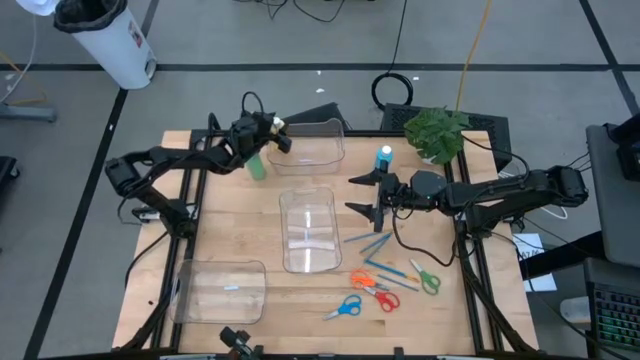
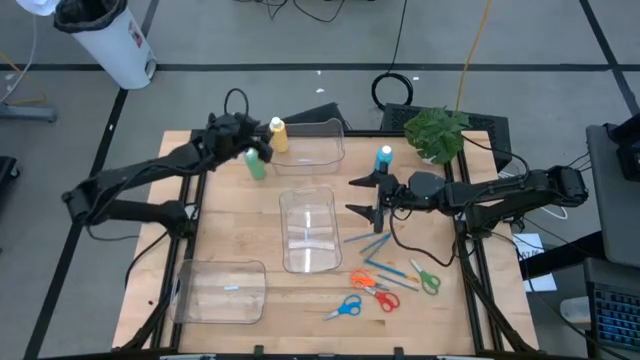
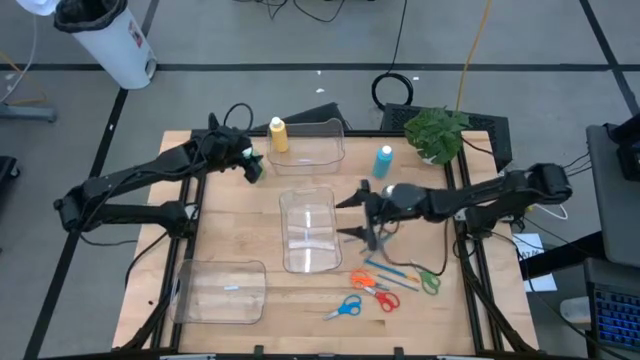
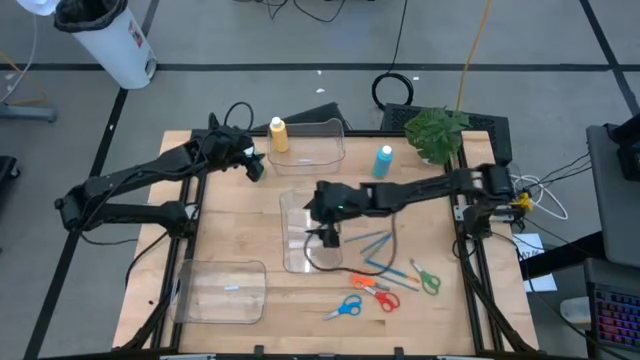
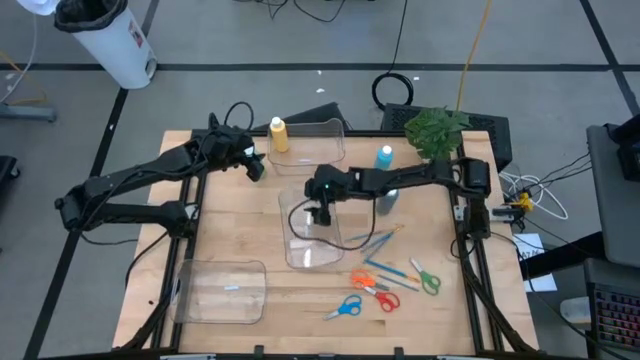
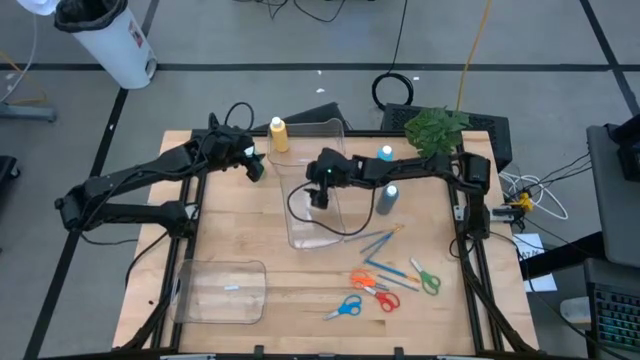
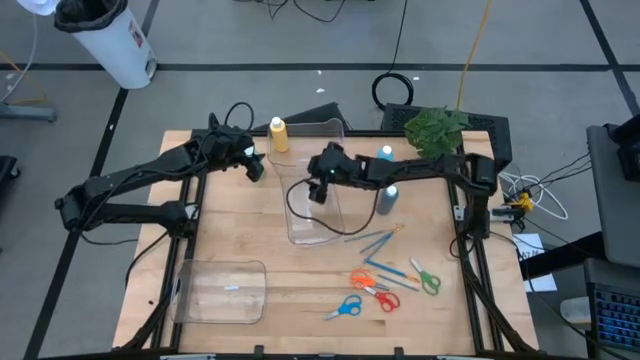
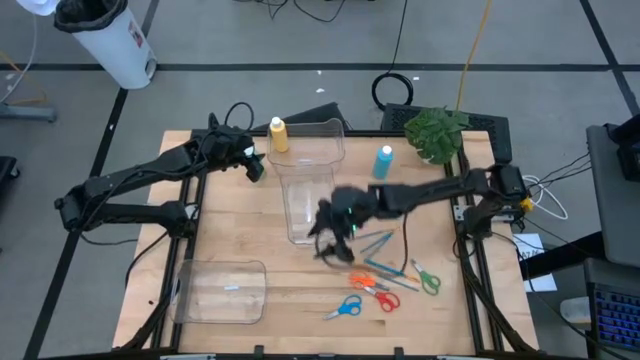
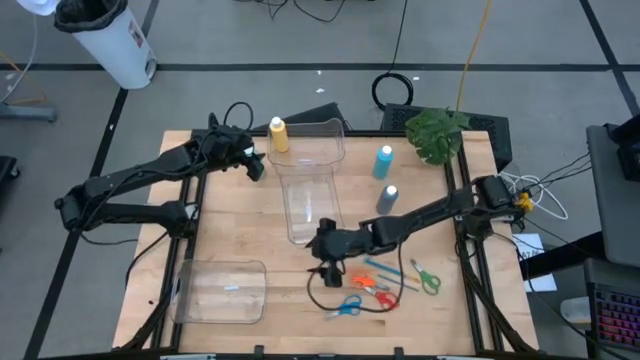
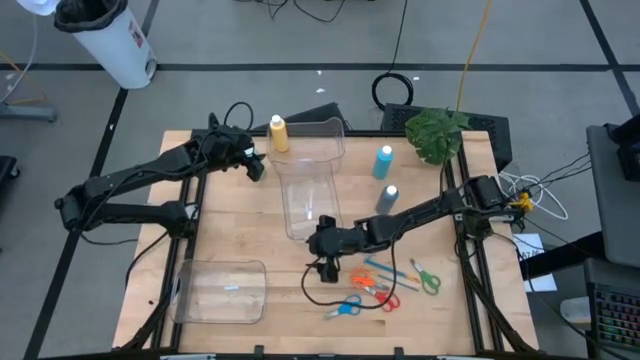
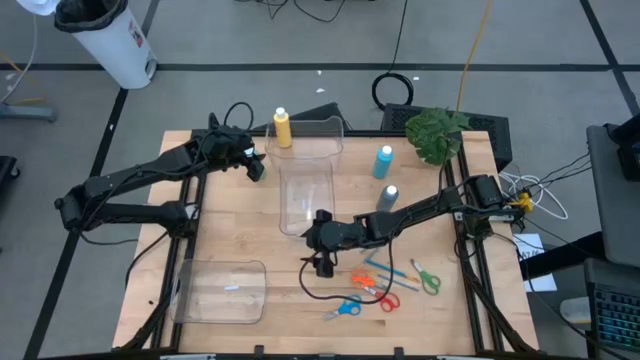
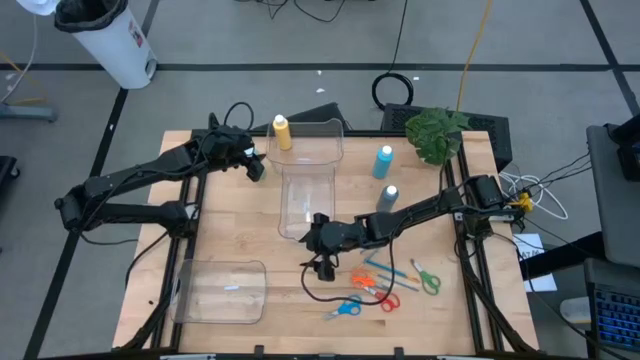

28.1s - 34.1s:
Task: Pick & Place Paint Supplies
Adjust the middle transparent bin

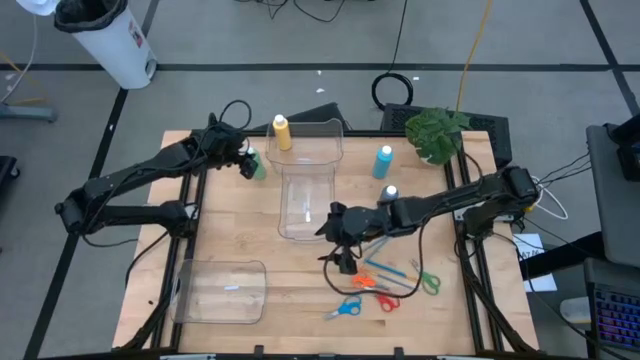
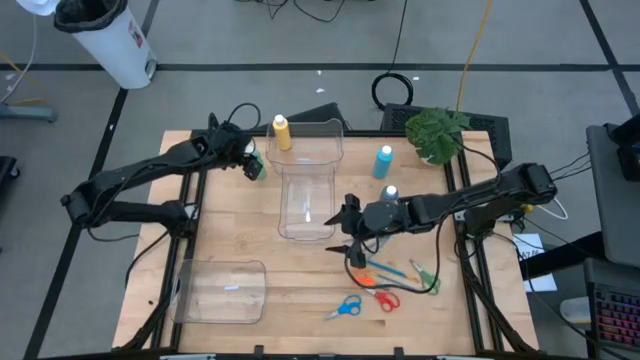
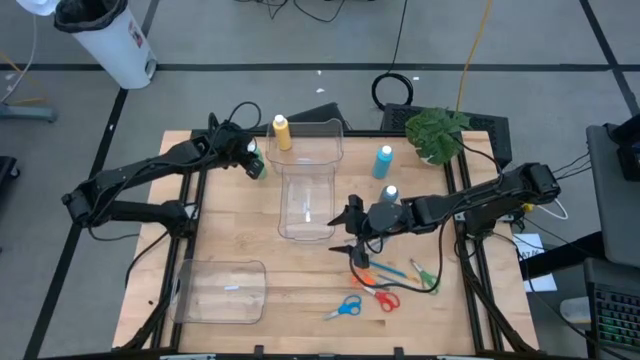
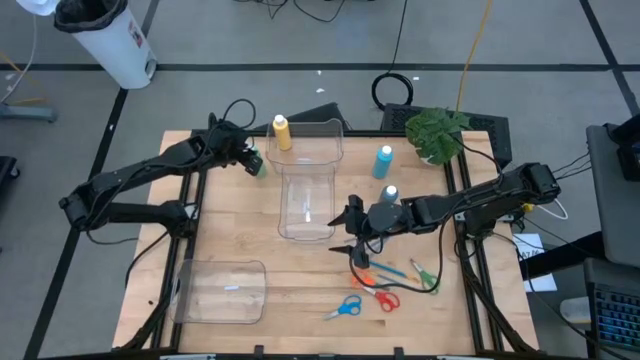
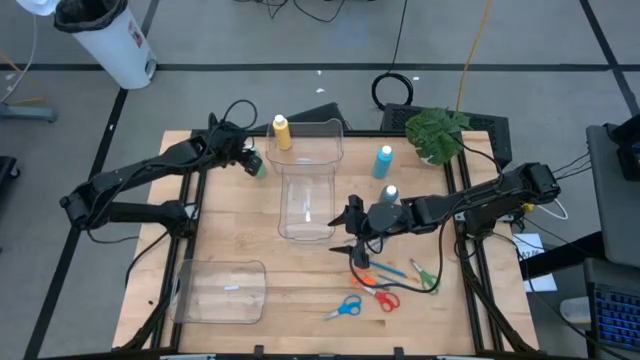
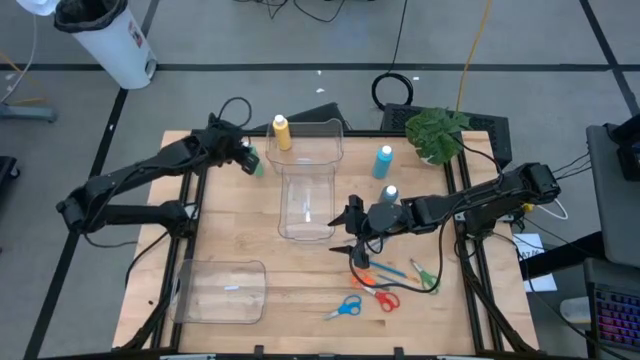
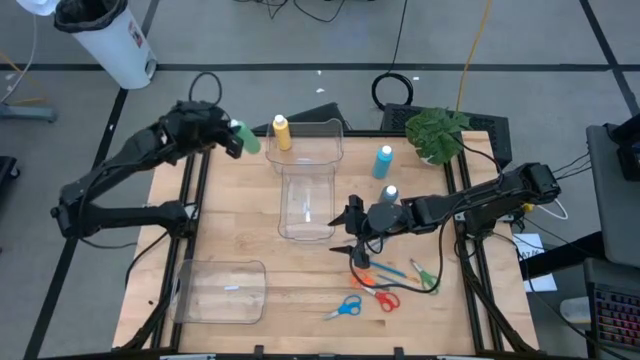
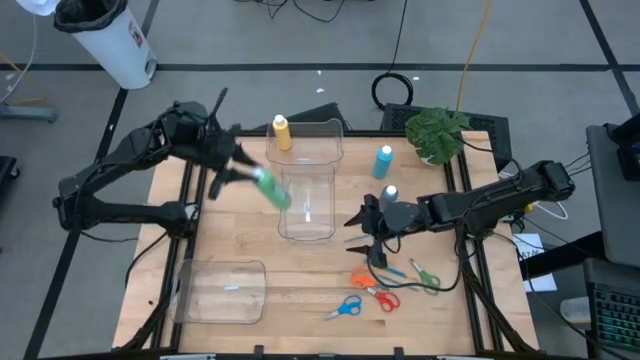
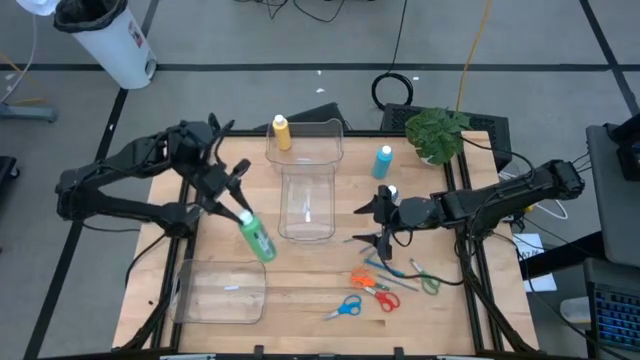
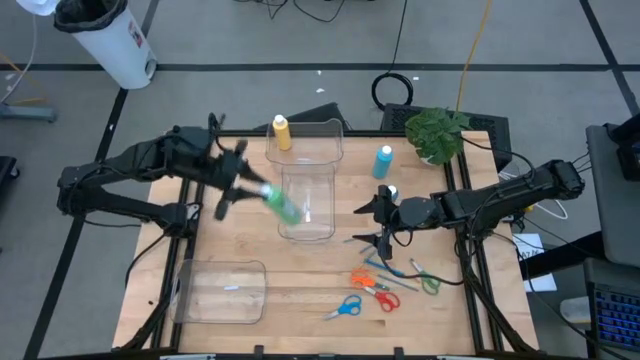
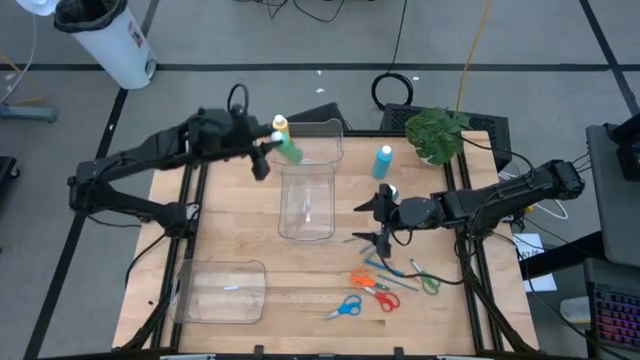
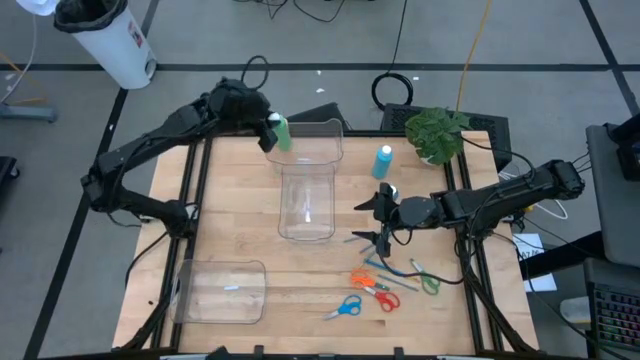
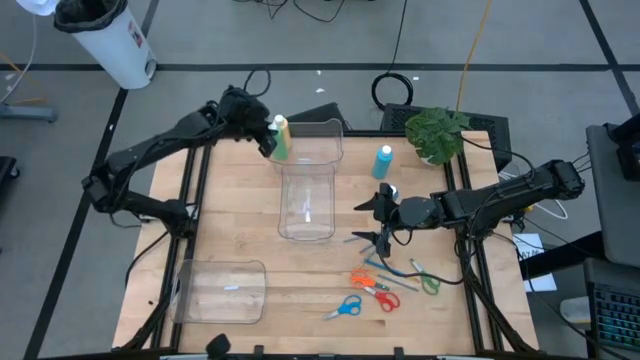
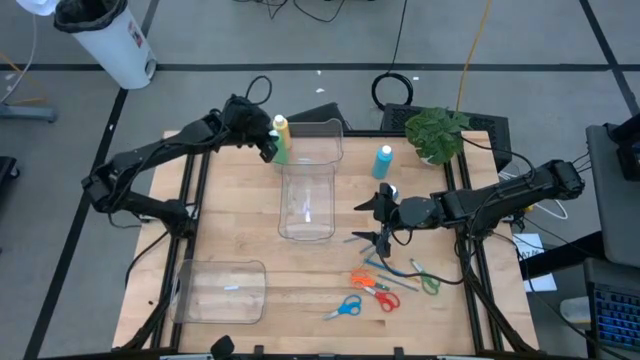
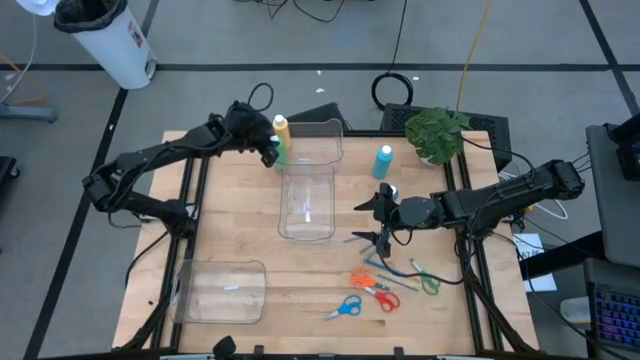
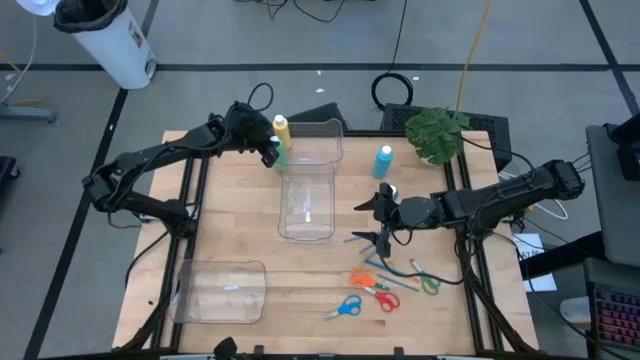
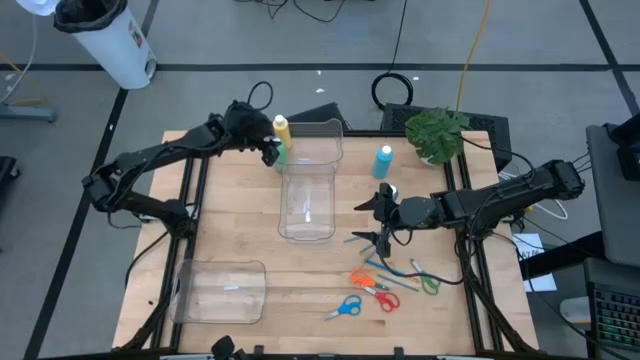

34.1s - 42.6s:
Put the green paint bottle into the top transparent bin

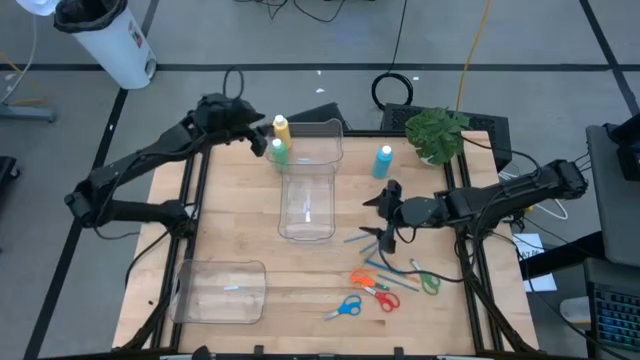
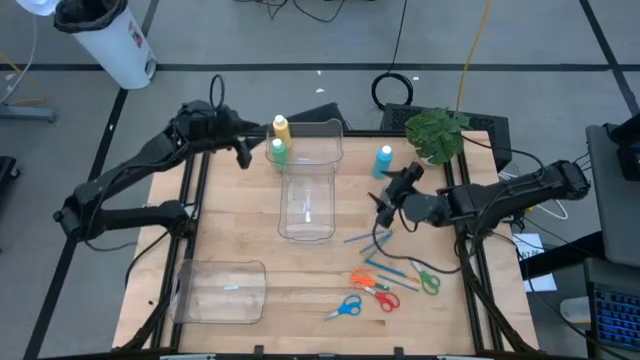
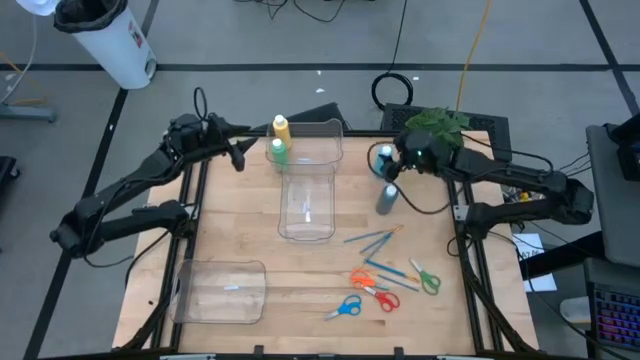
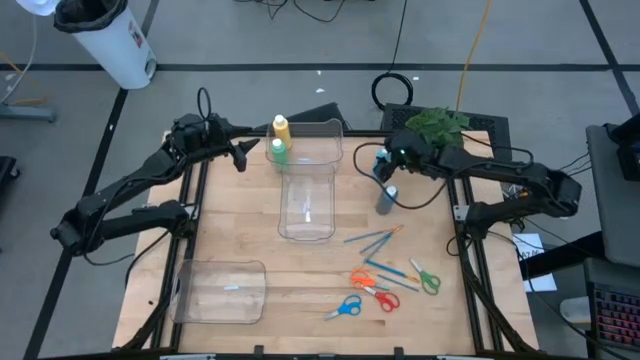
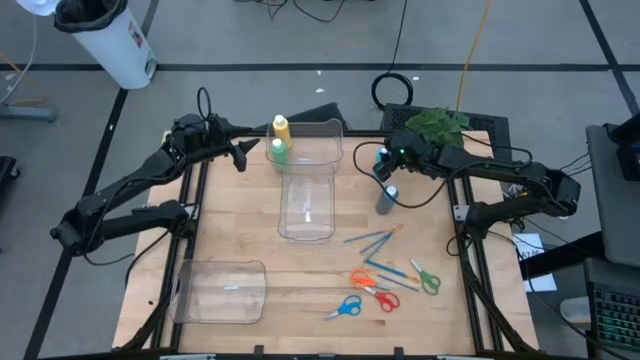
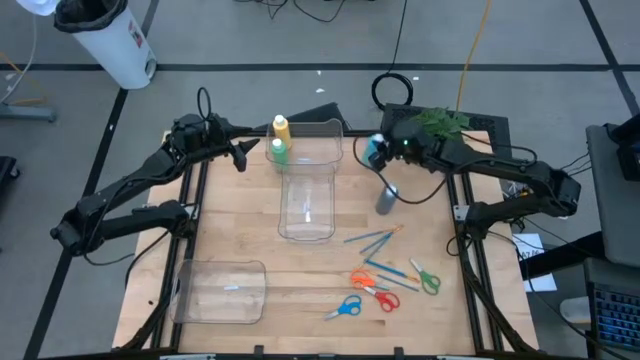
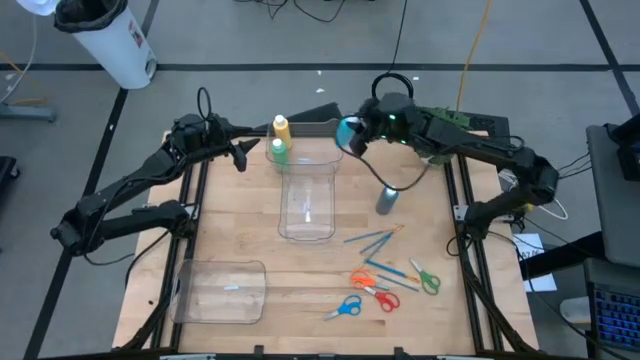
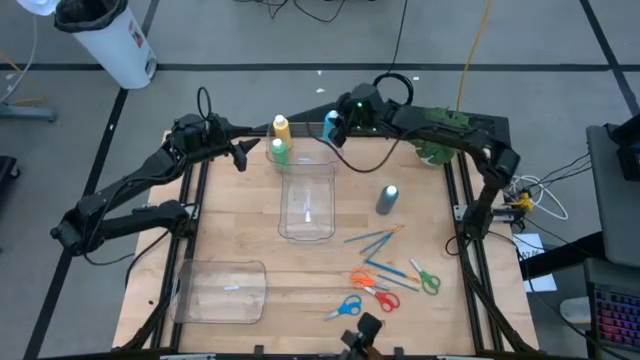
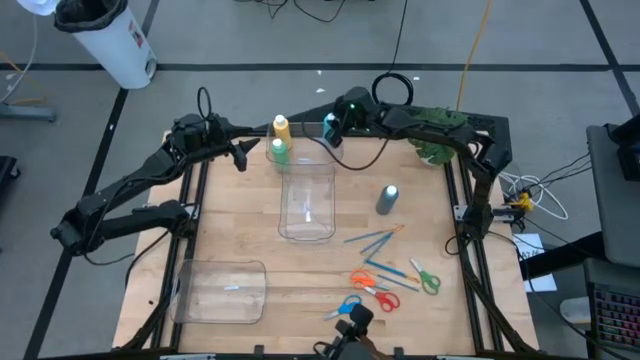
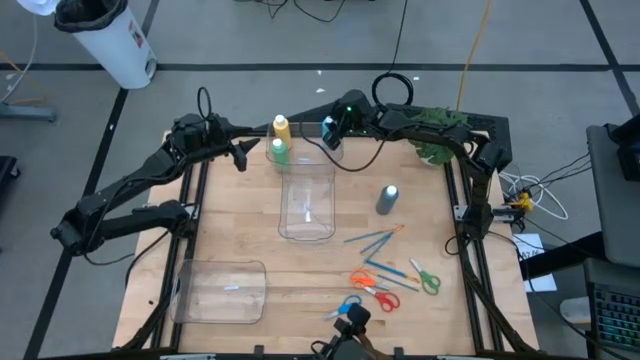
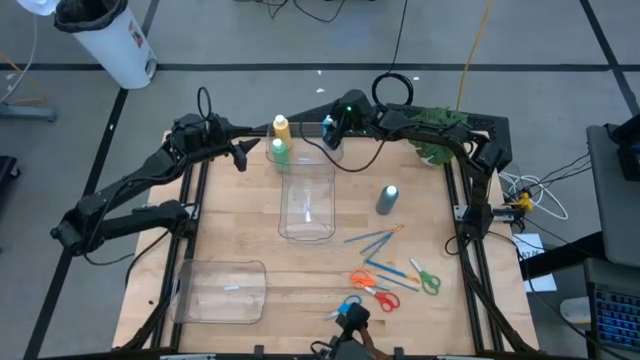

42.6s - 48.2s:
Put the blue paint bottle into the top transparent bin
